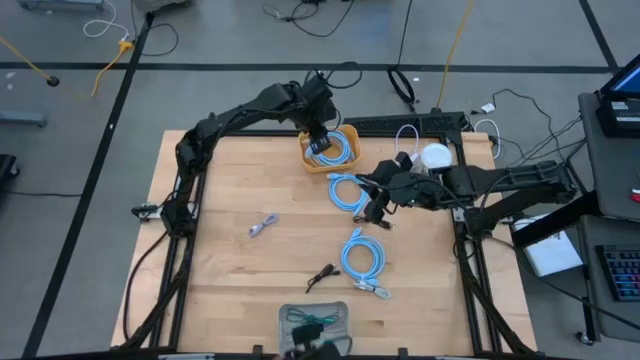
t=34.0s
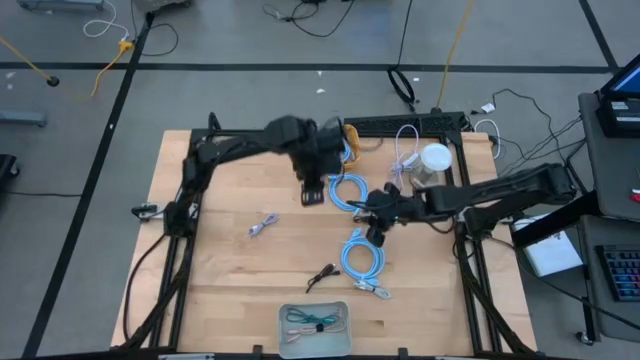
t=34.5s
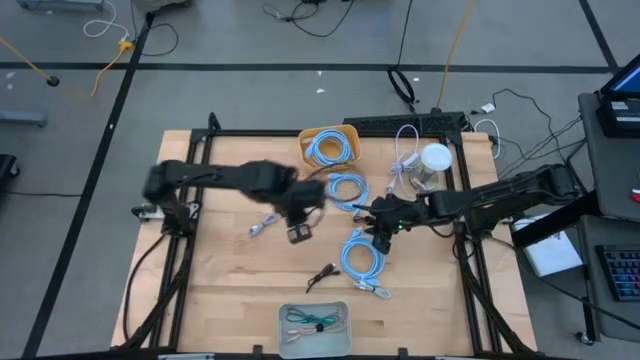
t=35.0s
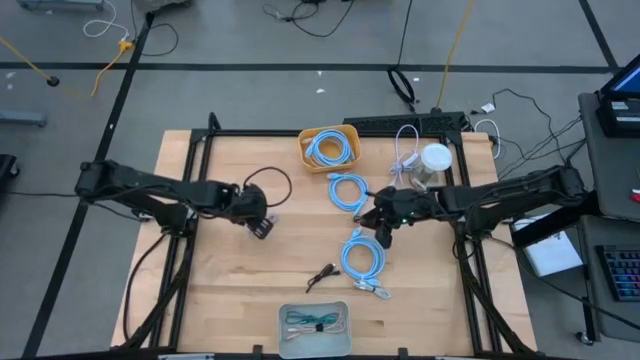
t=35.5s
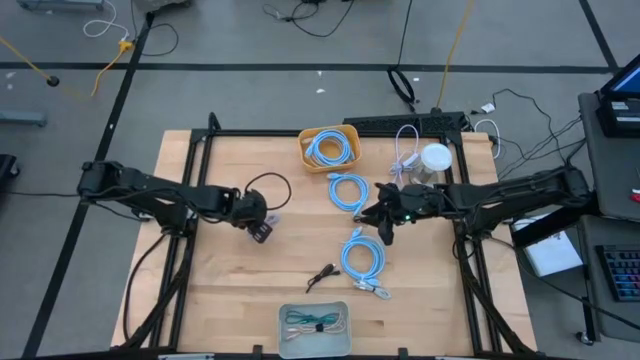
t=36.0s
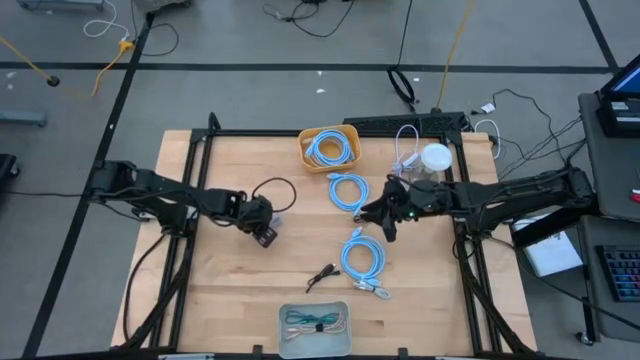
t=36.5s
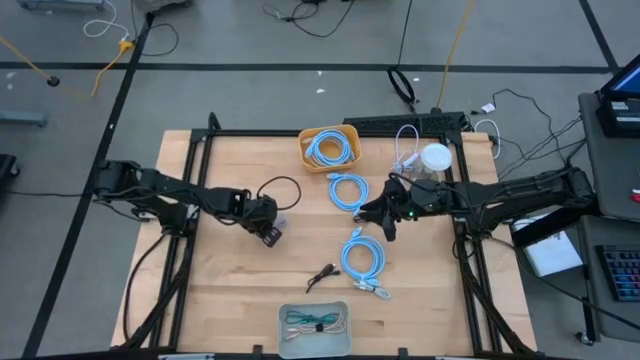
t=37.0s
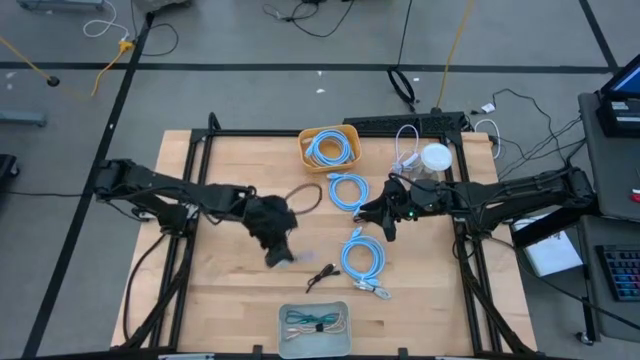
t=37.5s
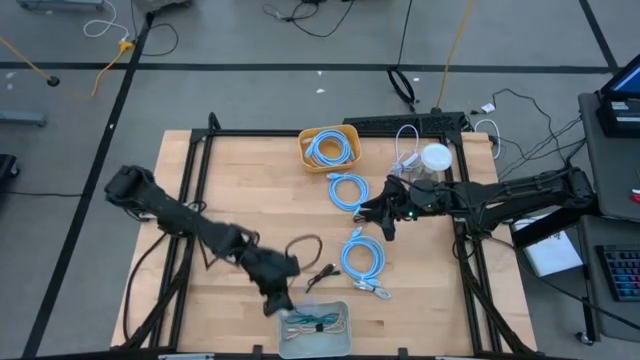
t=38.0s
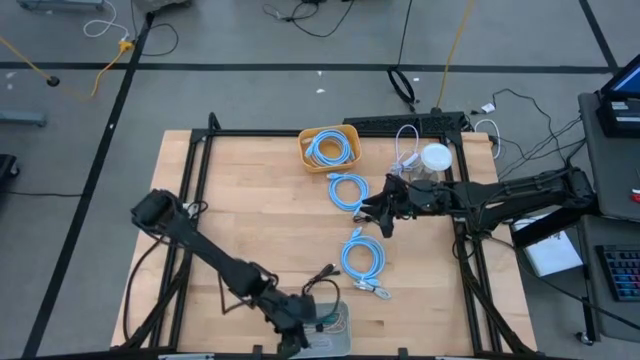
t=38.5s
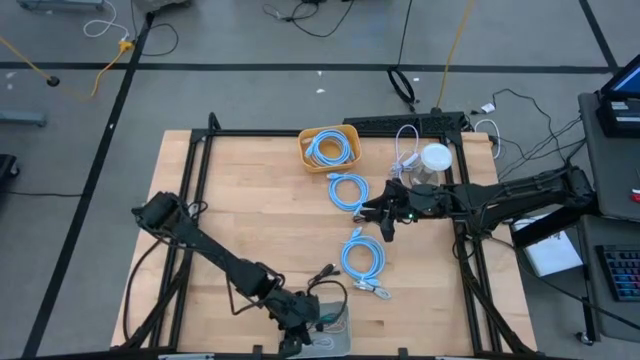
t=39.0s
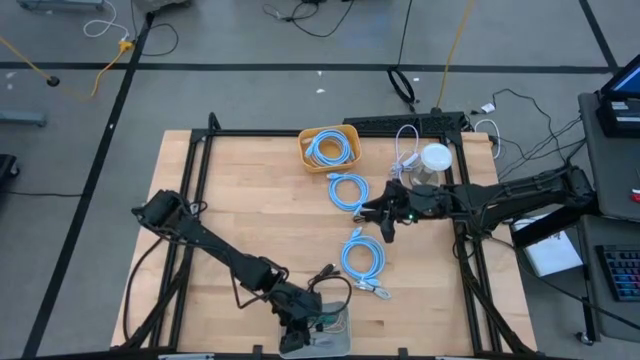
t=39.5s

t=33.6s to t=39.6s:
Task: Pick & Place USB Port
Put the purple charger cable into the gray bin

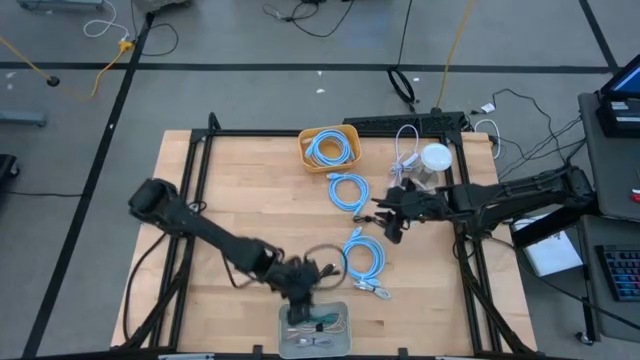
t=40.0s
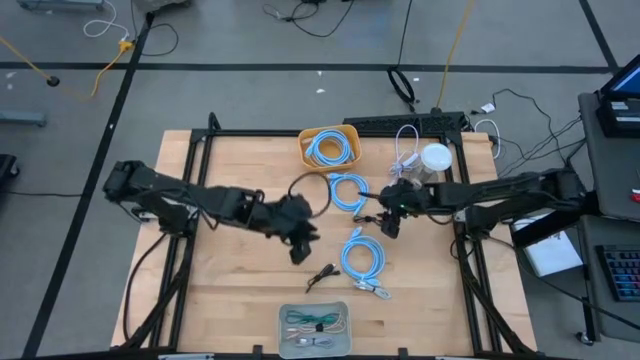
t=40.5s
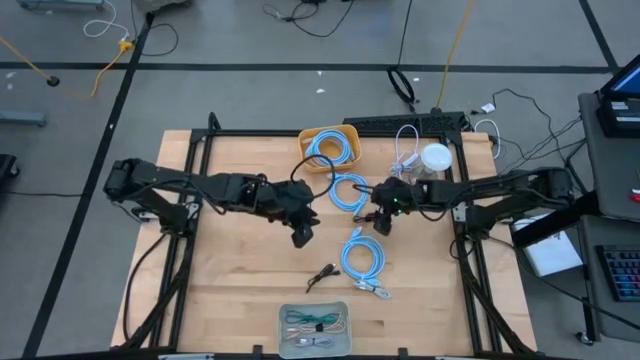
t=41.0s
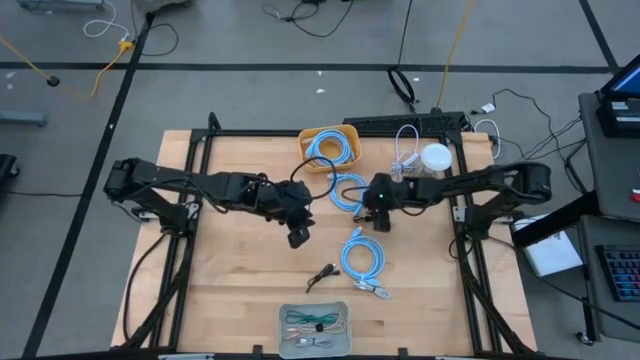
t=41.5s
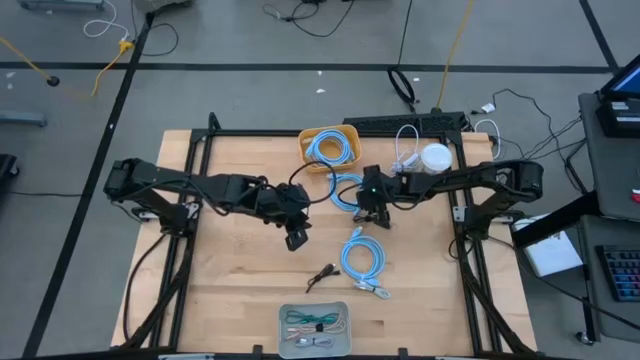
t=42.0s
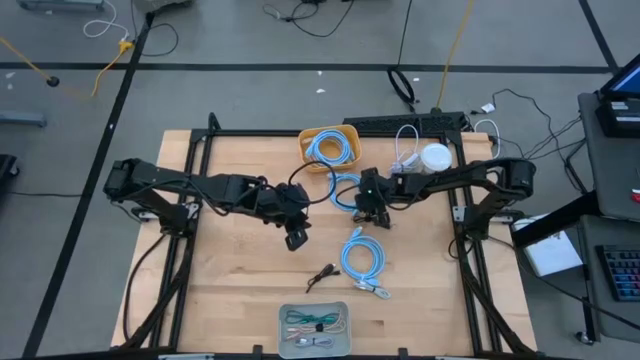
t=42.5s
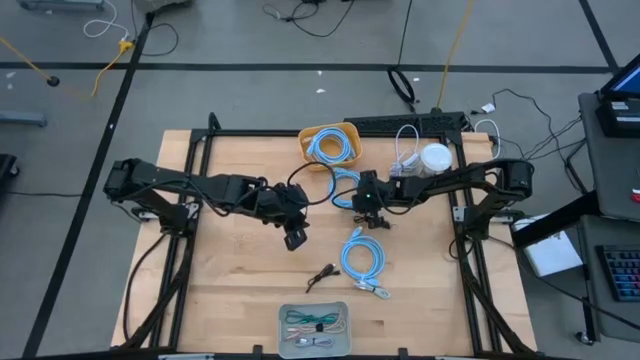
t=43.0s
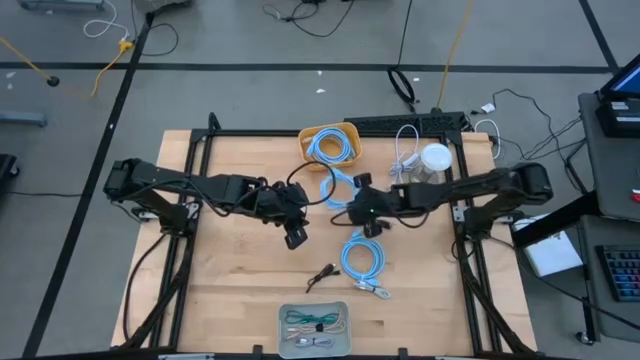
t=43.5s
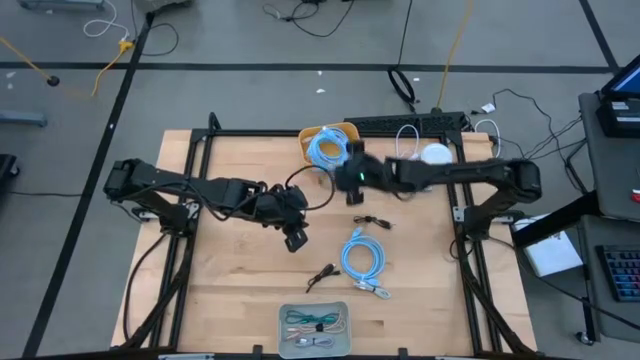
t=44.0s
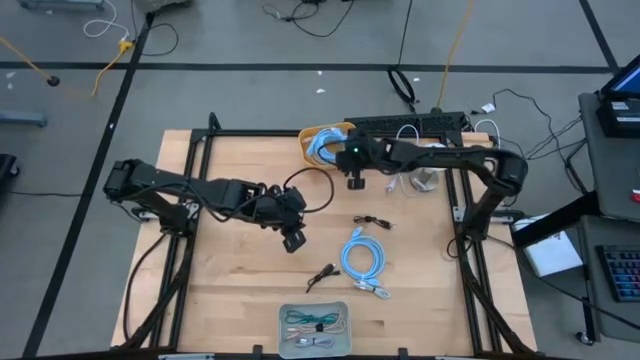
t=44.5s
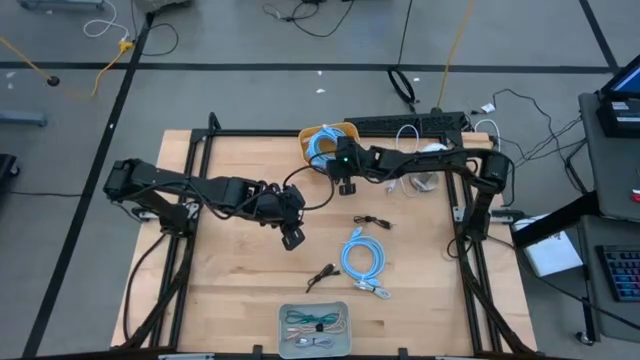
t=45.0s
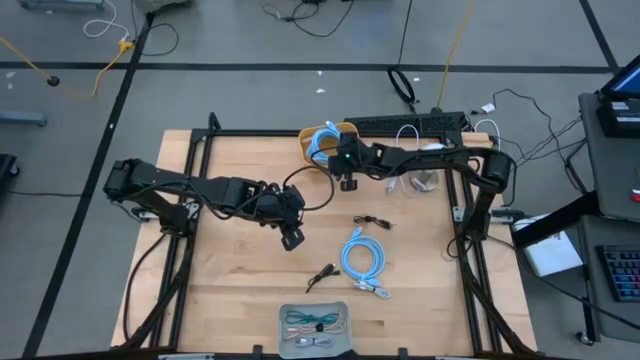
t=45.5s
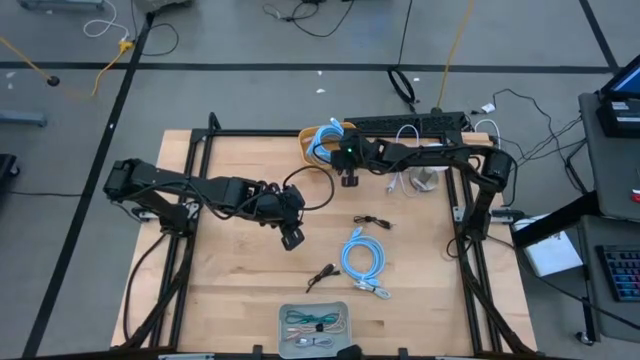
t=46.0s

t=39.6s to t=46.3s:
Put the top HDMI cable into the yellow bin

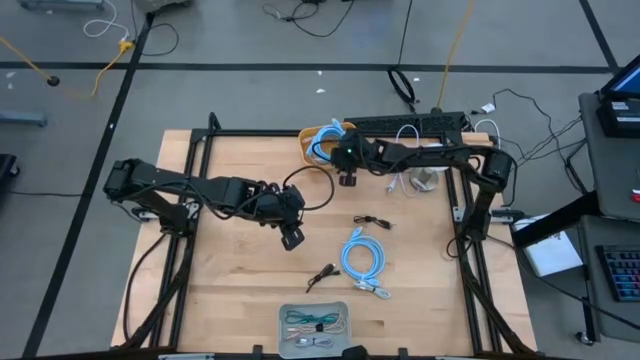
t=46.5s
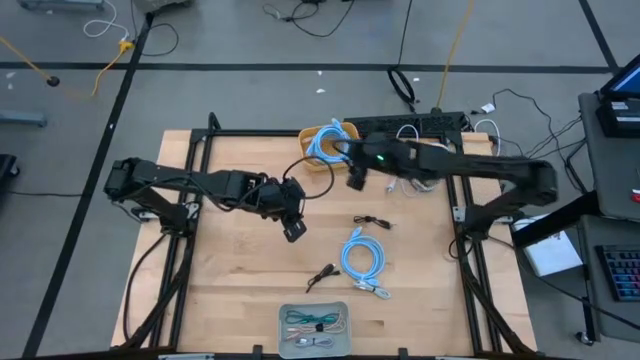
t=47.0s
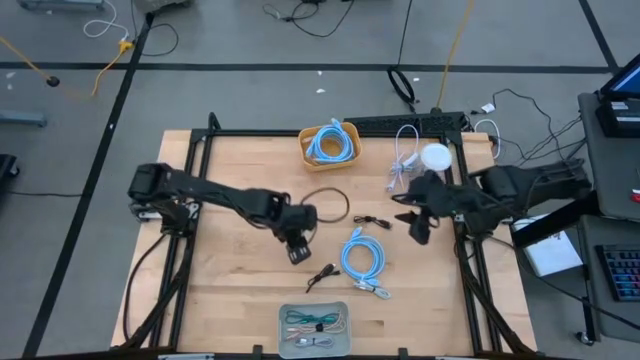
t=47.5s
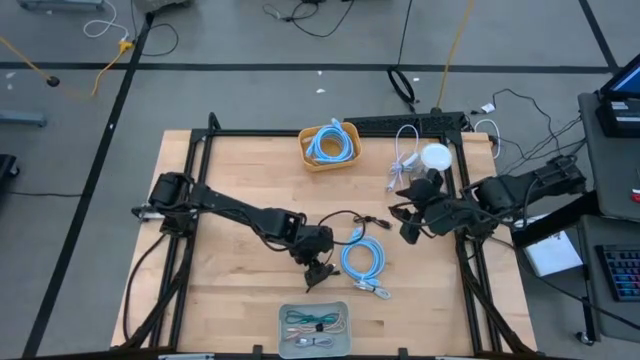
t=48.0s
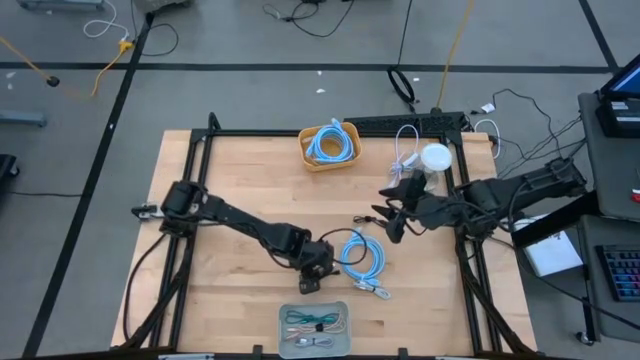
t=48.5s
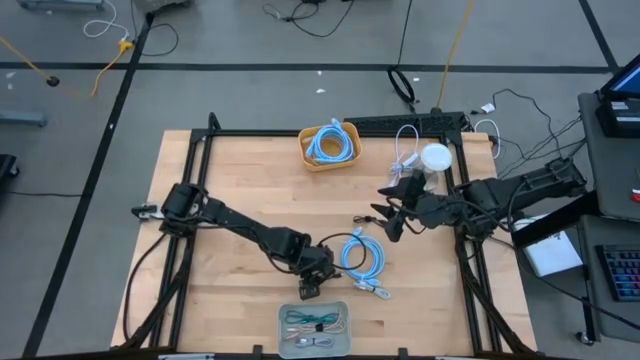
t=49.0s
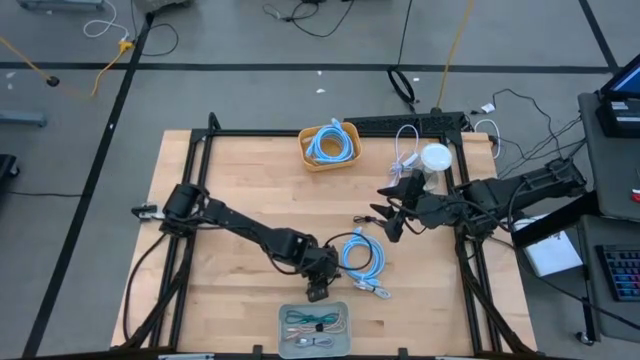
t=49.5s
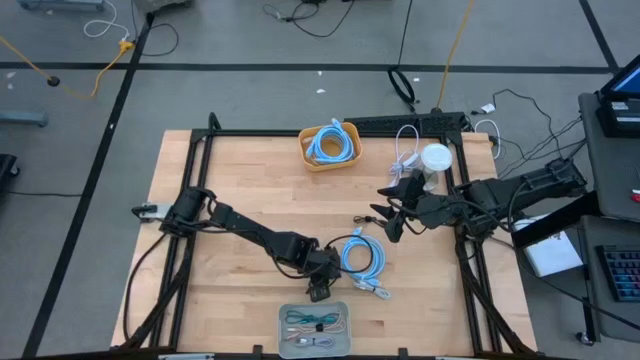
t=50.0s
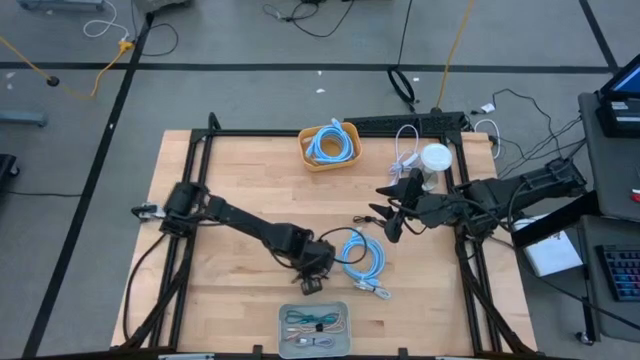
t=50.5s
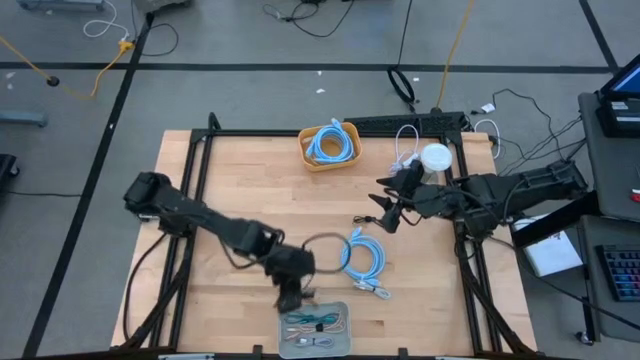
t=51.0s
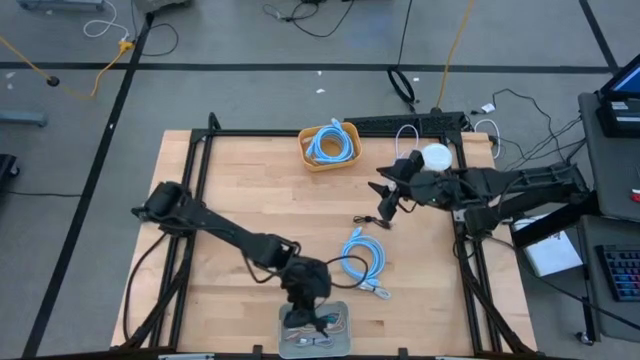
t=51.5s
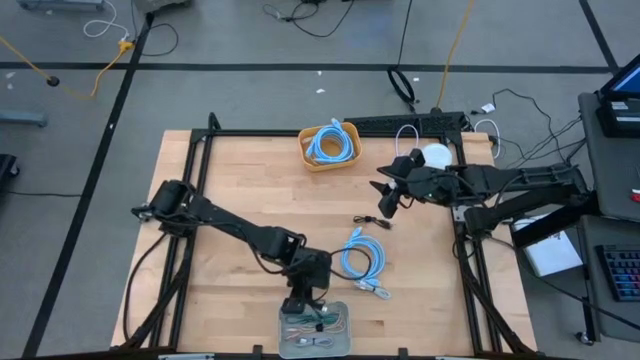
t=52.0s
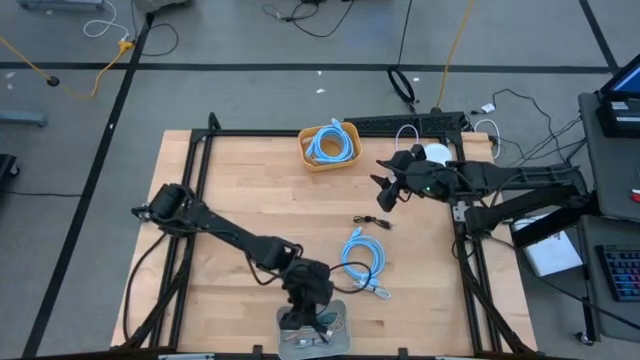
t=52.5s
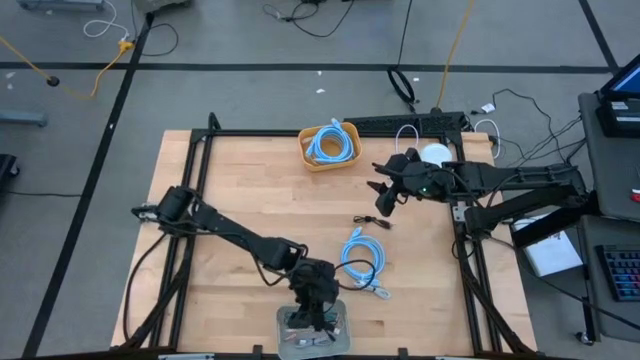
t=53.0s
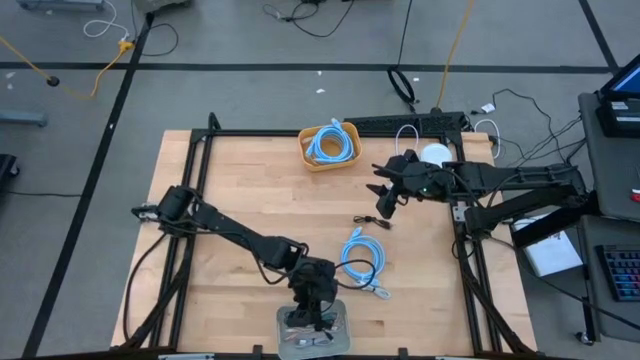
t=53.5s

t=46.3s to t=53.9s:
Put the bottom black charger cable into the gray bin

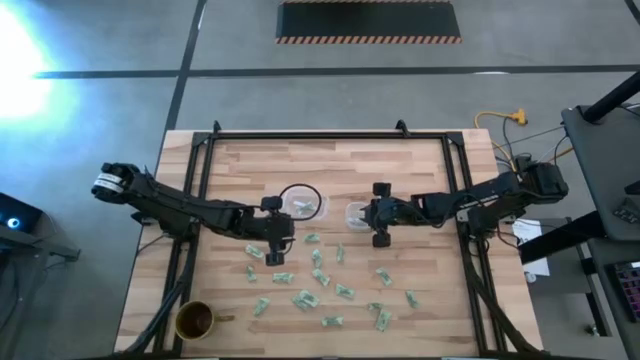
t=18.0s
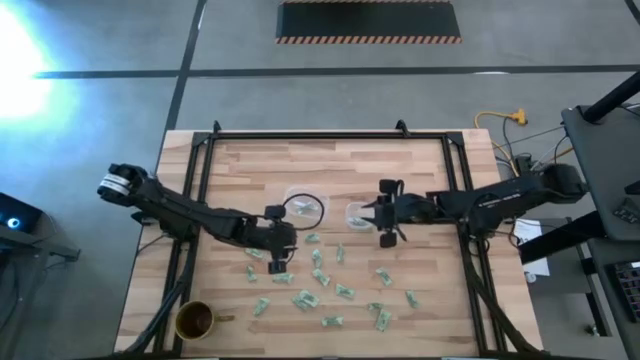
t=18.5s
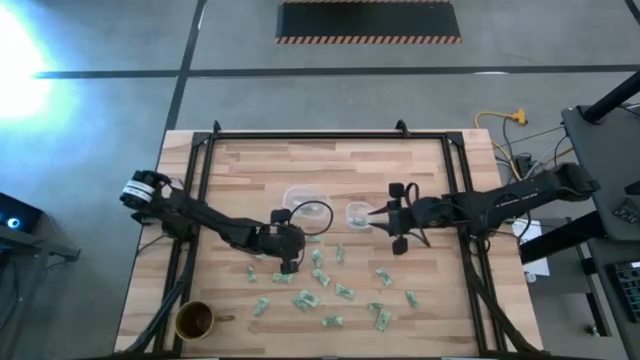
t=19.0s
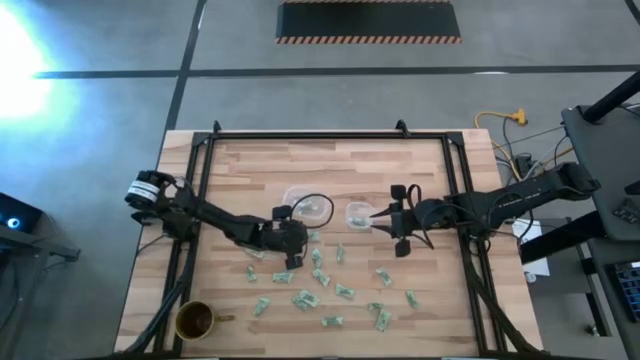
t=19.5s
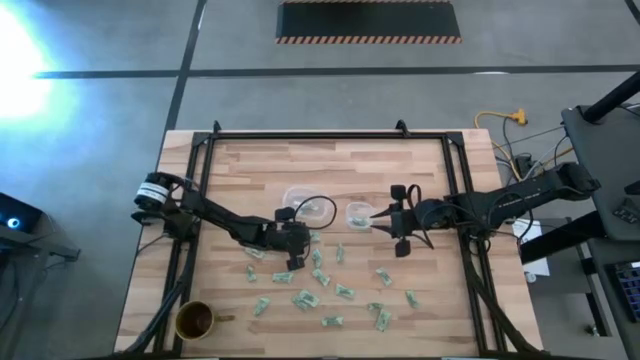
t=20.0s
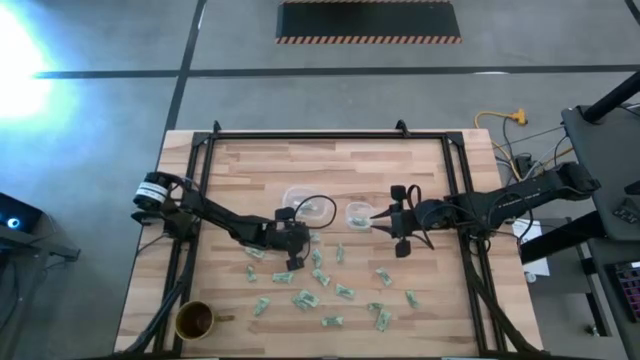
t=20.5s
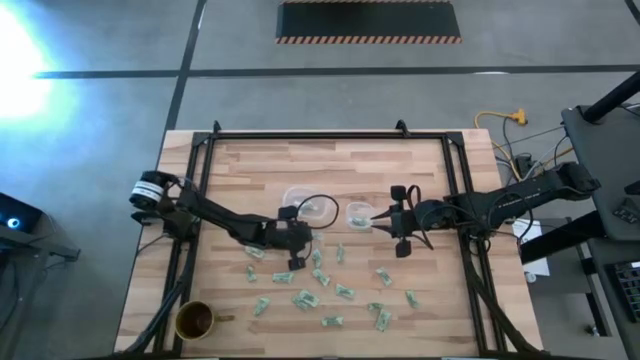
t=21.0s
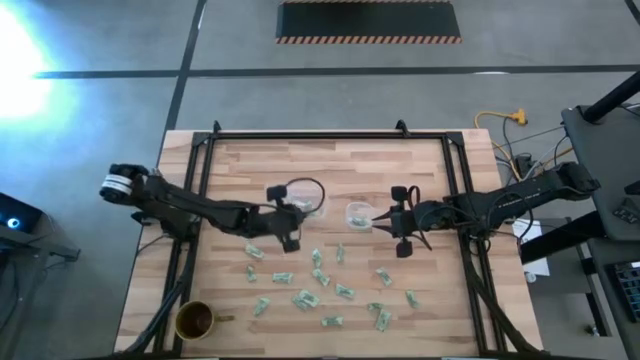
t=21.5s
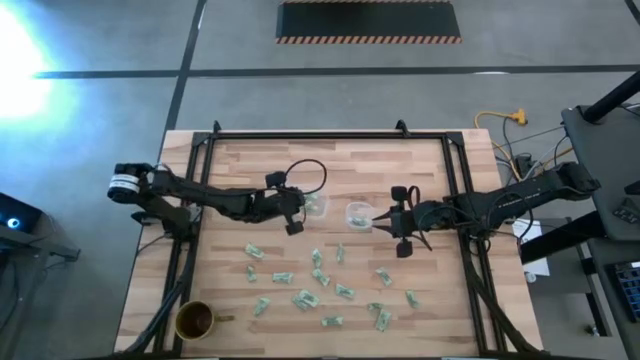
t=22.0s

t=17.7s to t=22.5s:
Task: Pick and place items into bin
Put the green stevia packet into the left transparent bin
